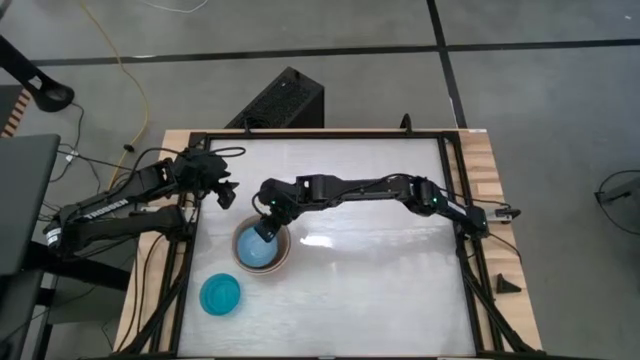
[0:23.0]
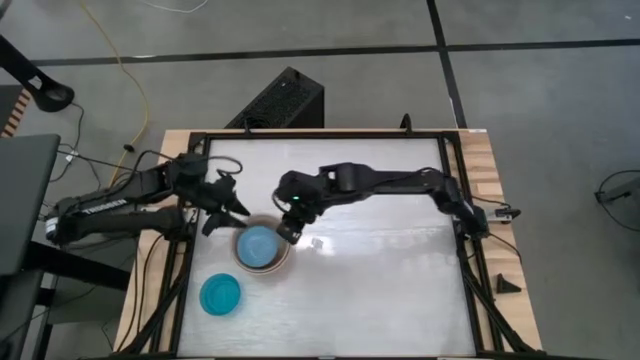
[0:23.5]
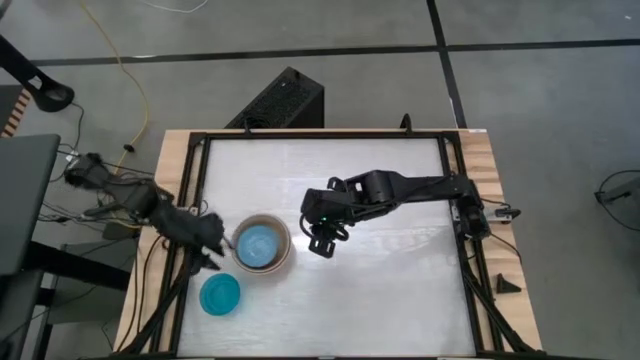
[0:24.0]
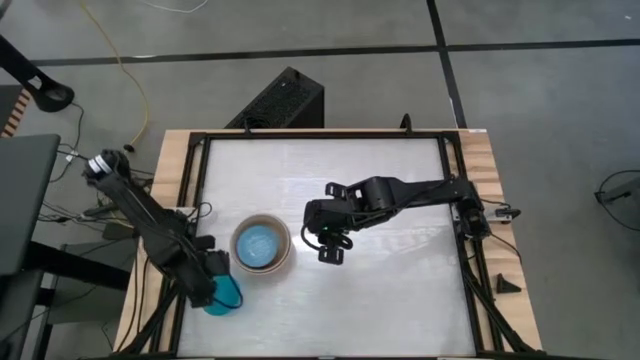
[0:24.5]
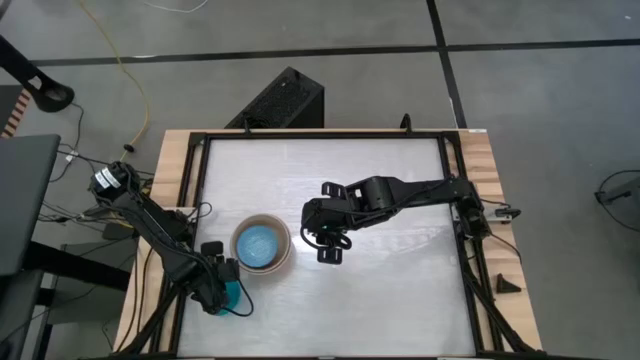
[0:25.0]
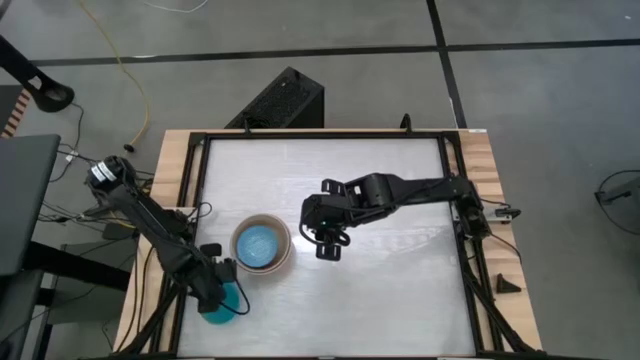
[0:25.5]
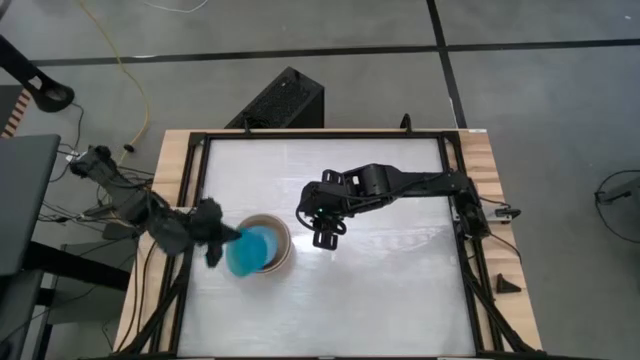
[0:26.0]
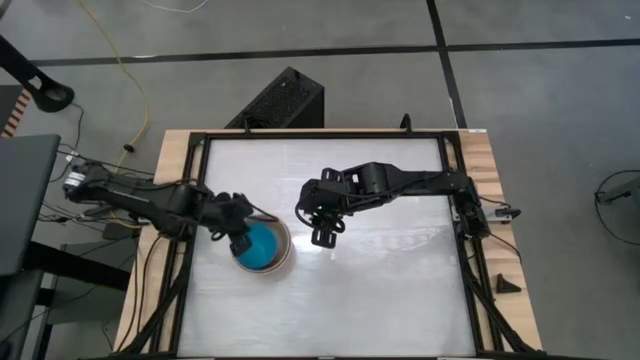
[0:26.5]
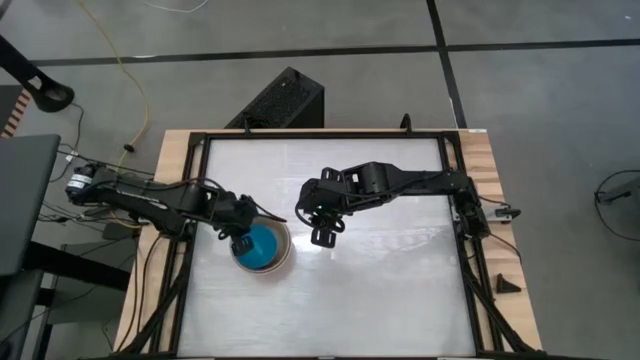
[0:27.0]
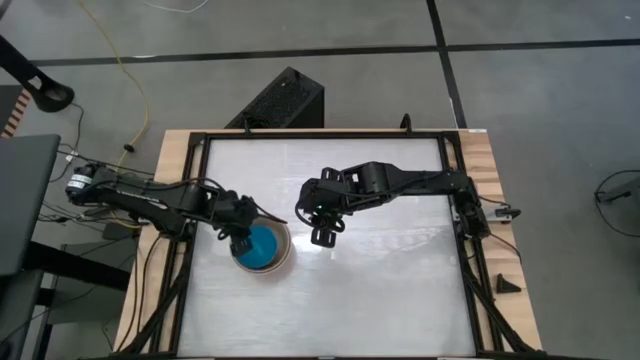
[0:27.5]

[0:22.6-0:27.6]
Stack the blue bowl on top of the blue patterned bowl

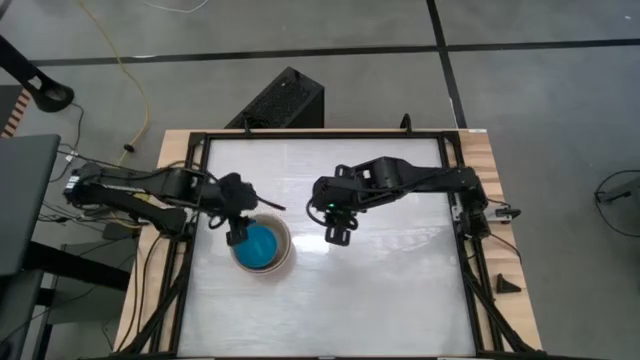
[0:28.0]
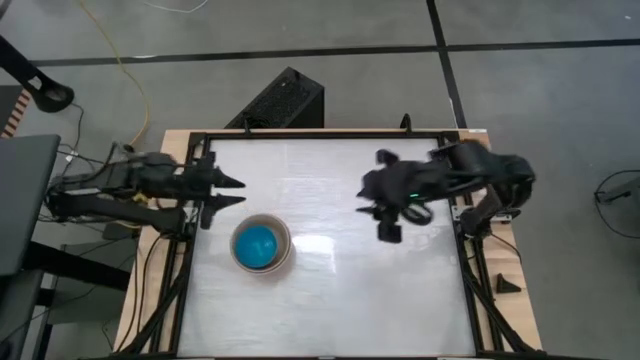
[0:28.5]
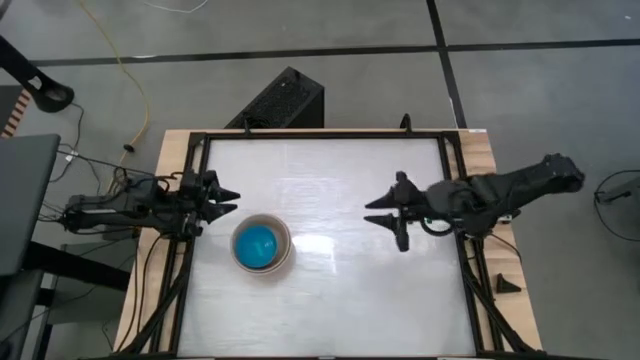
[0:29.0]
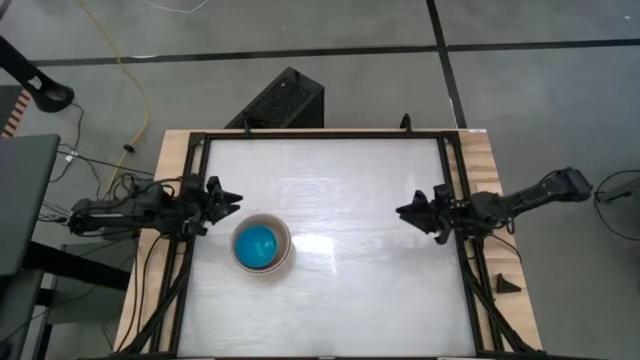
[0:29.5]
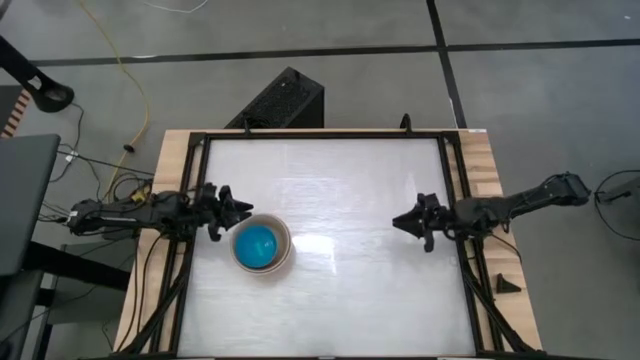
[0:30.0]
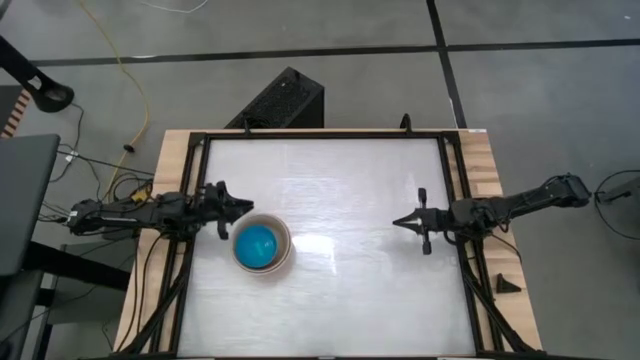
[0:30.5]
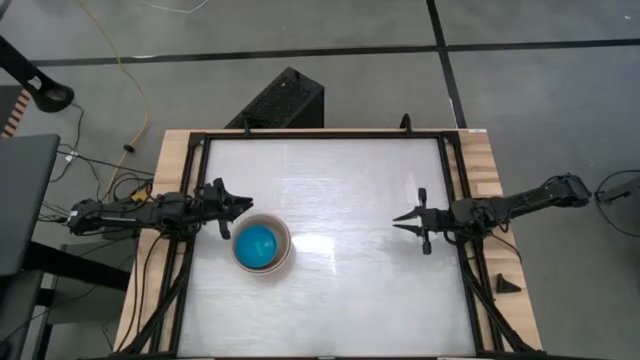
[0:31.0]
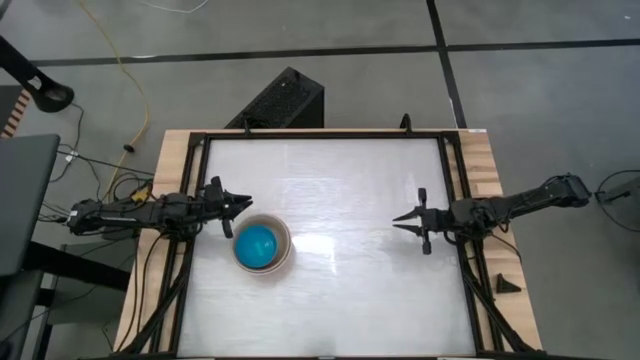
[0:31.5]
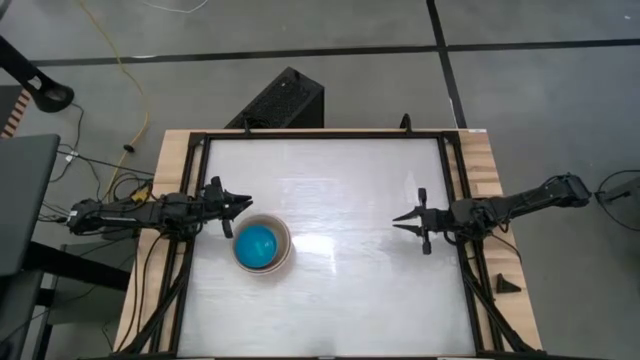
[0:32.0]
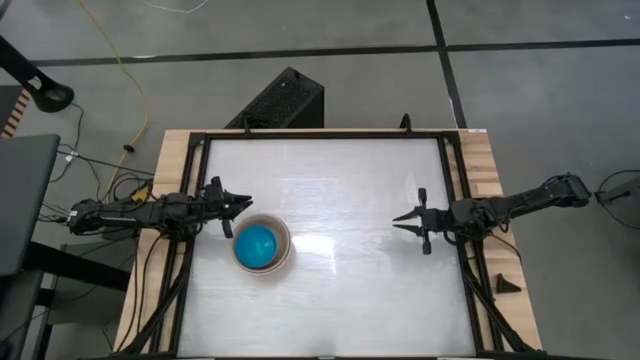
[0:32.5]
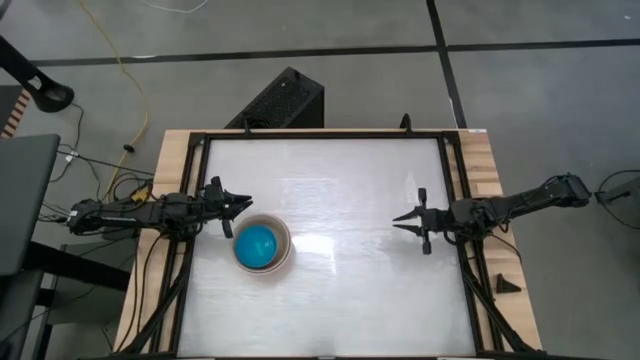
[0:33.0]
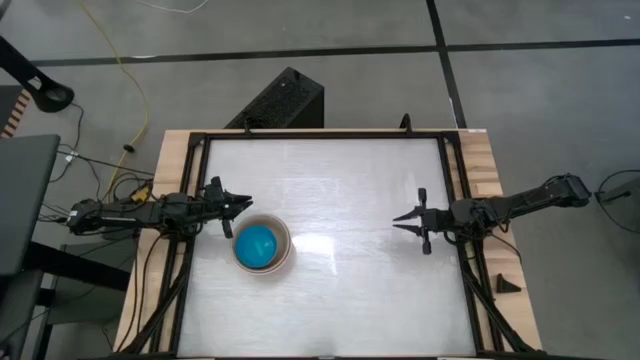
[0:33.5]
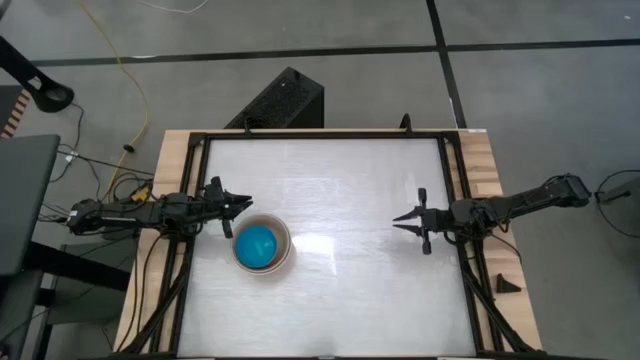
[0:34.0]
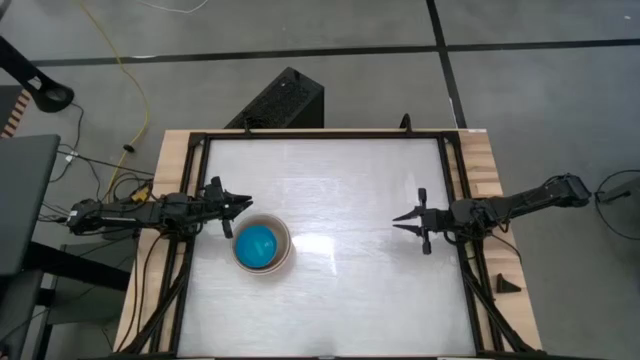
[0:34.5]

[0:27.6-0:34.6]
Return to Home Position

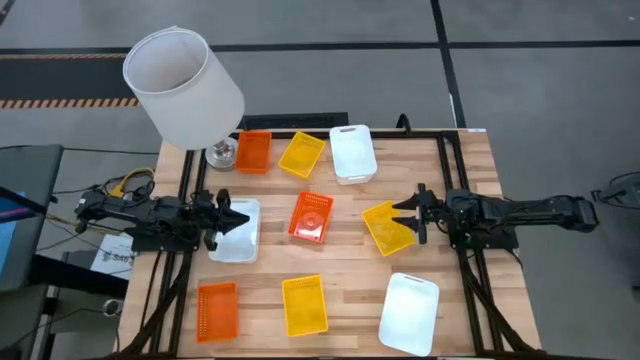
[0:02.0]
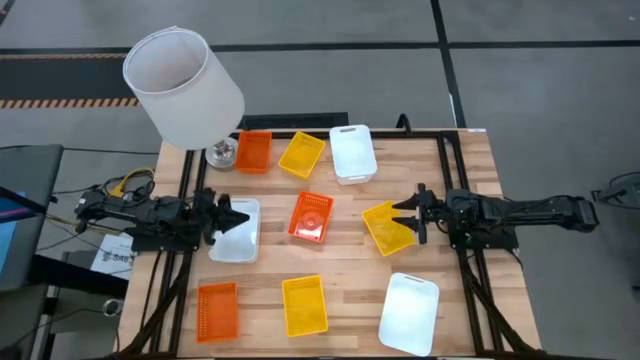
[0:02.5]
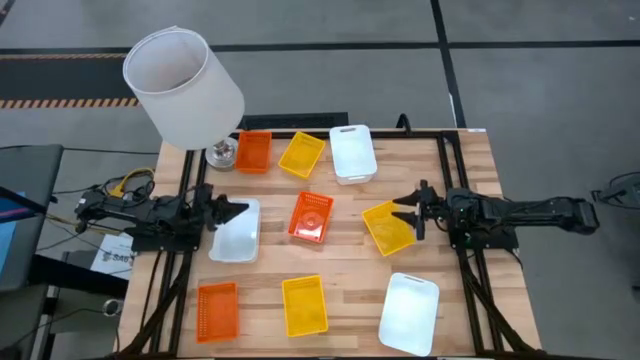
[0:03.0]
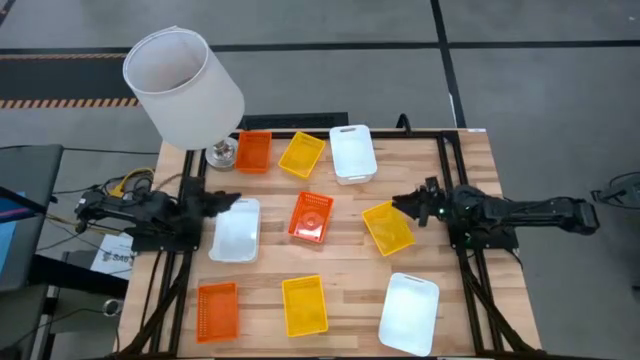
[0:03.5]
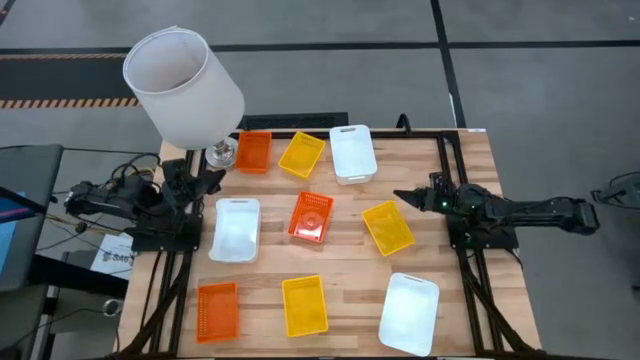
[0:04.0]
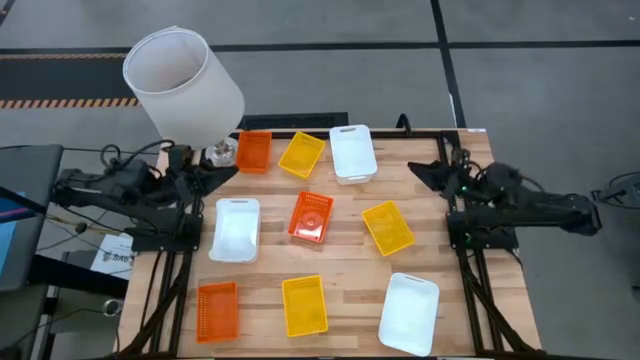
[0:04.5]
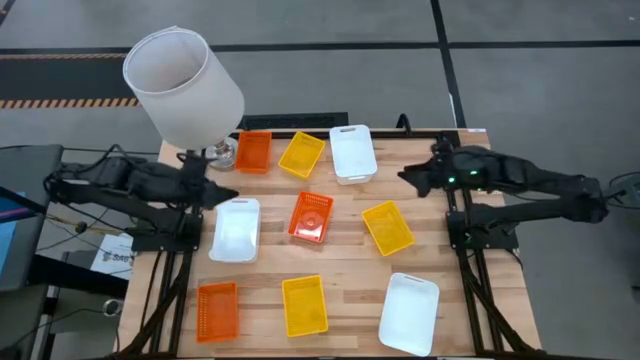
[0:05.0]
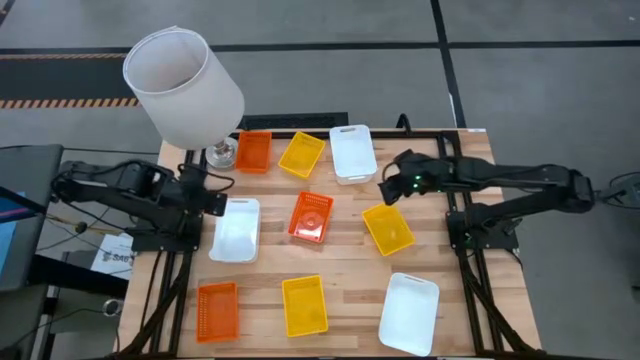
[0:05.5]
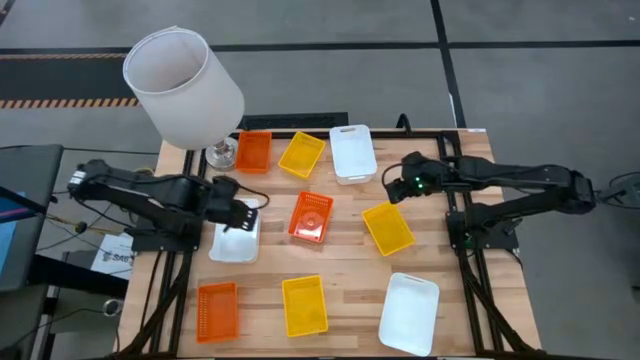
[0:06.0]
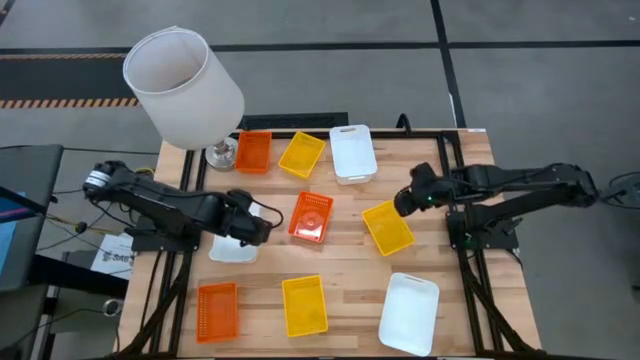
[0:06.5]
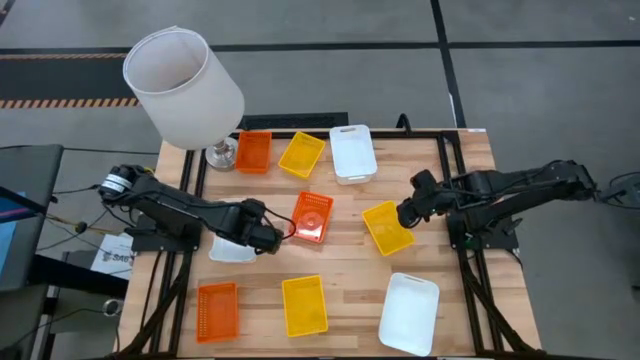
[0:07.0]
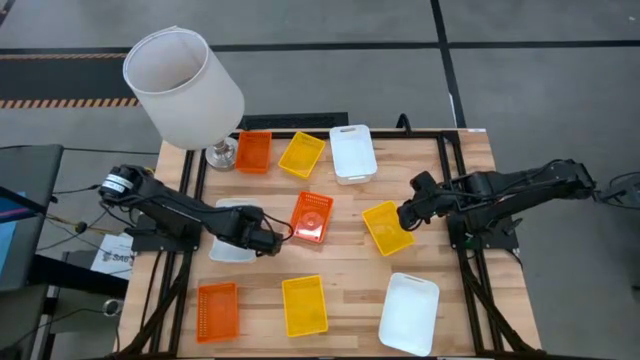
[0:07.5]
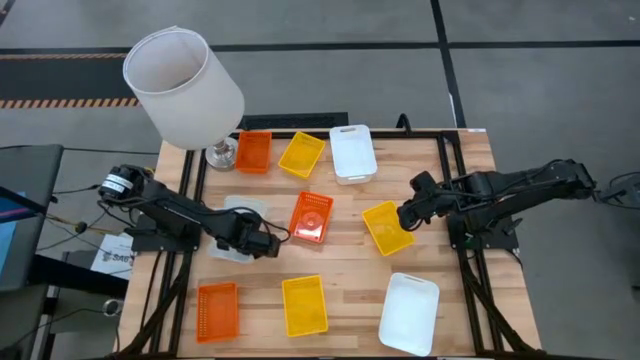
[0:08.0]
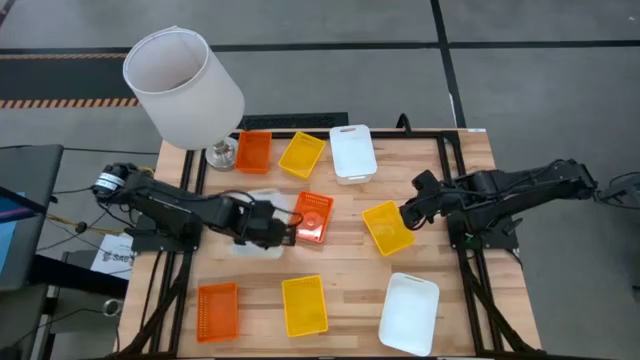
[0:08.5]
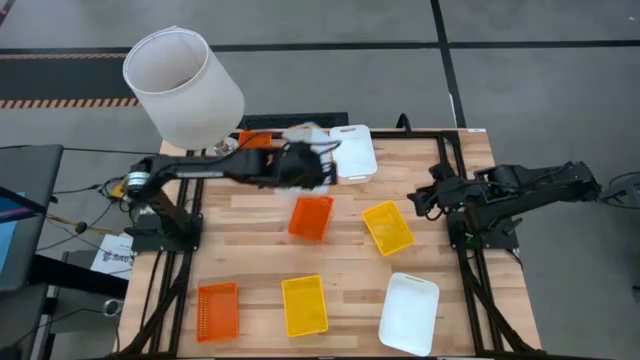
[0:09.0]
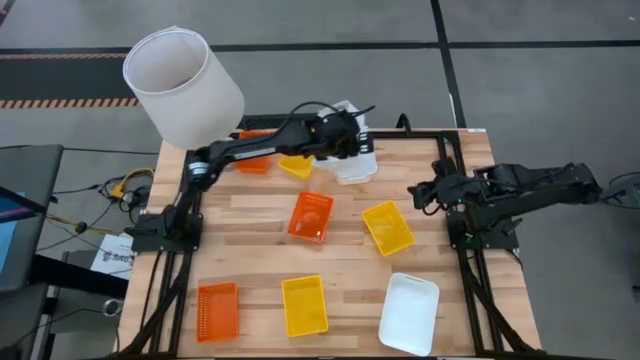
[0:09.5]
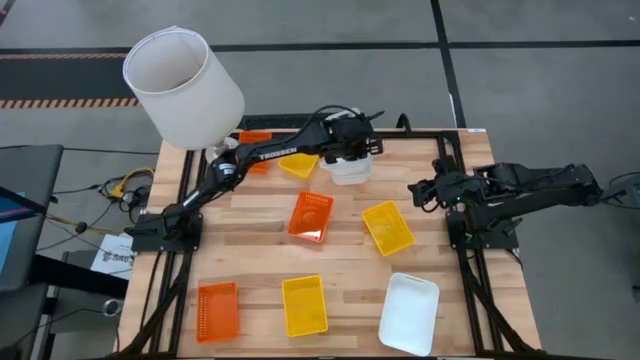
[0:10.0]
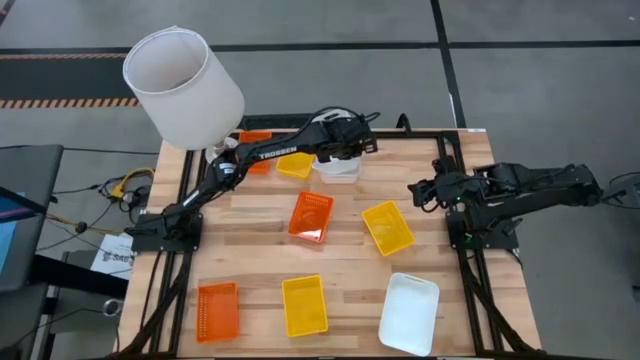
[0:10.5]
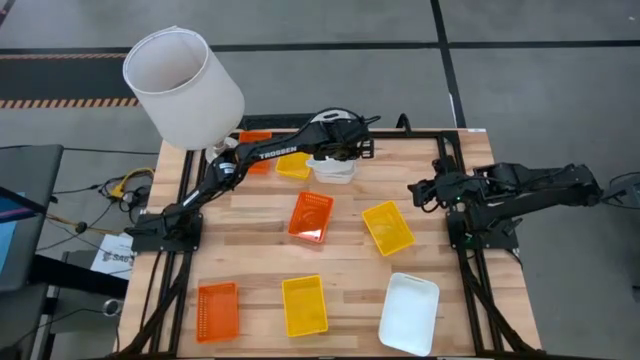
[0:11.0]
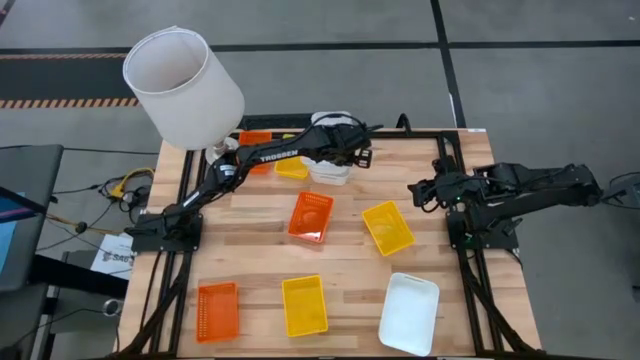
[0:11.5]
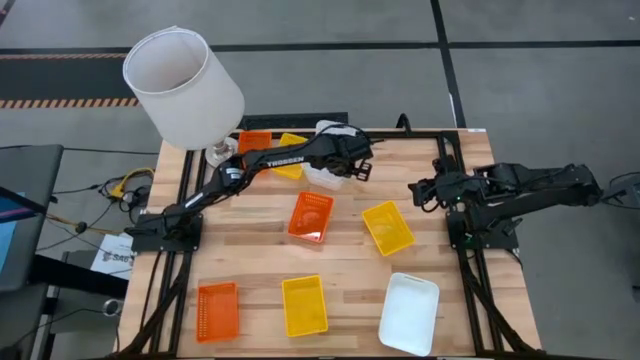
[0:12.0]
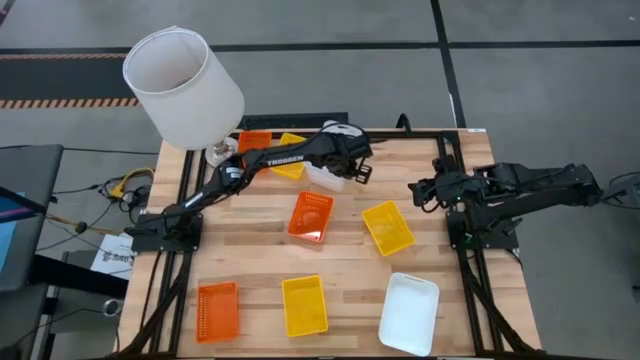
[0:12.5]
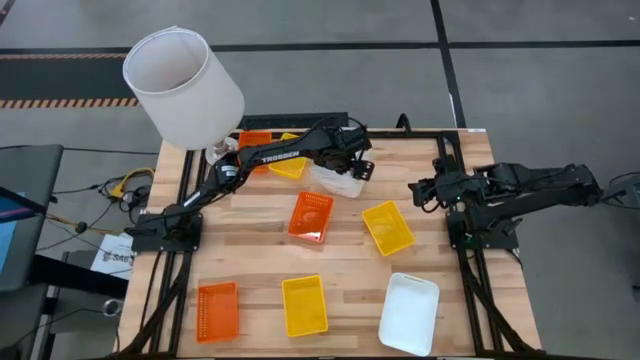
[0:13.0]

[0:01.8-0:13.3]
Stack the middle white bin on top of the top white bin
